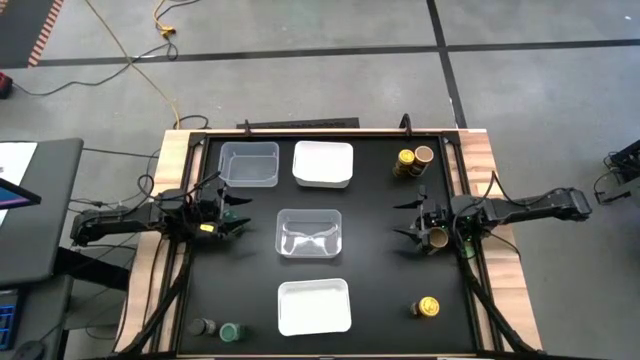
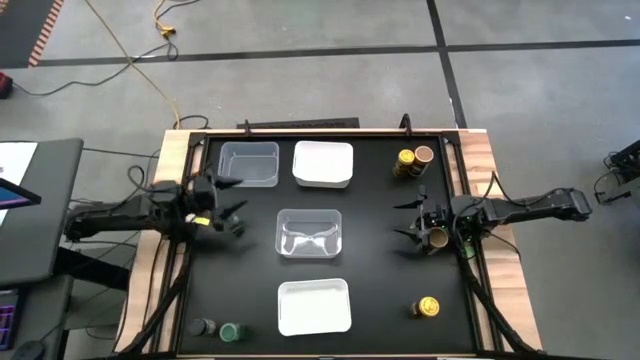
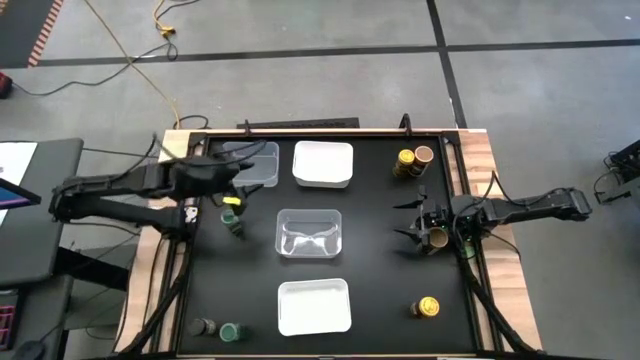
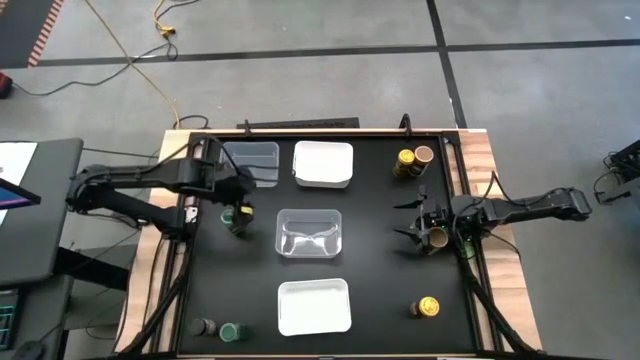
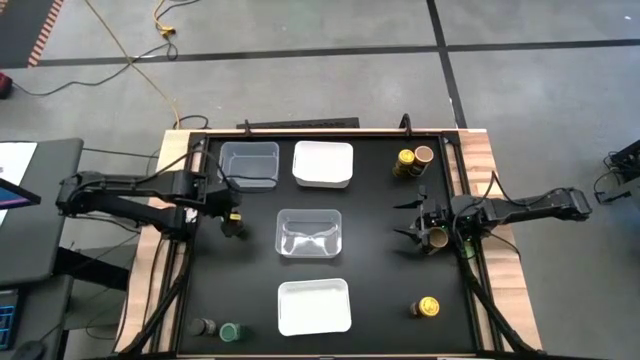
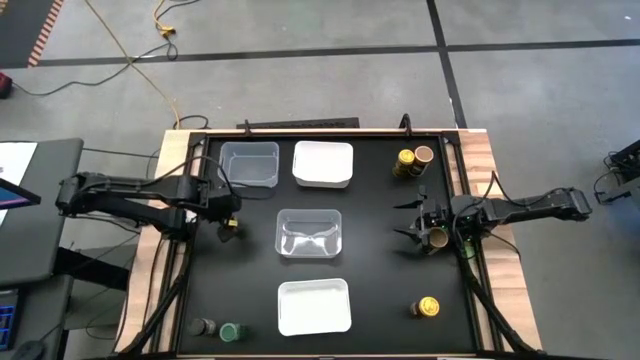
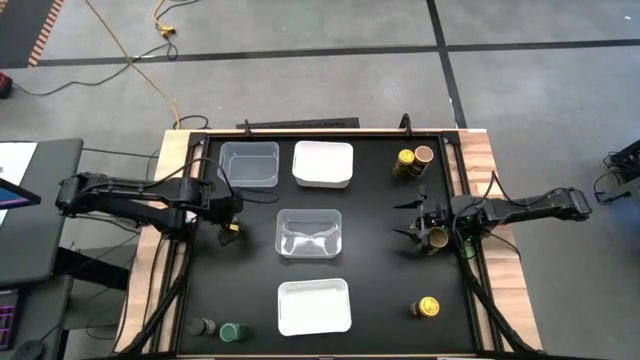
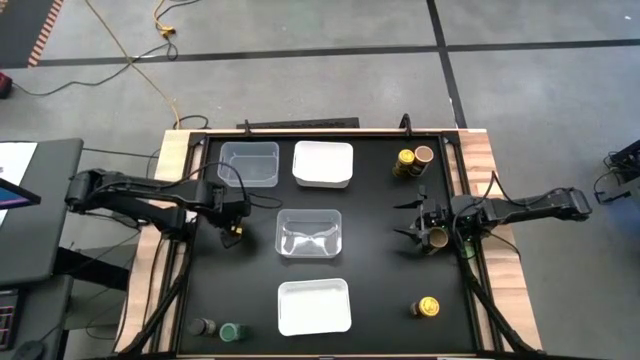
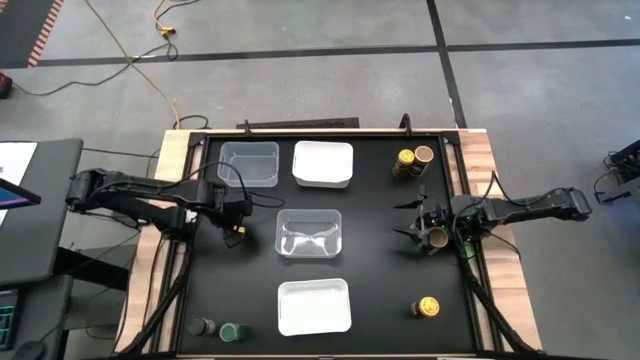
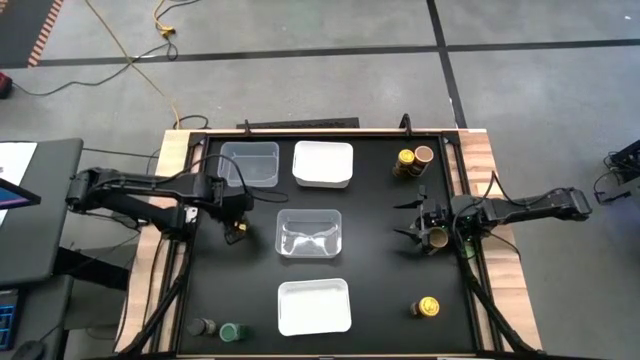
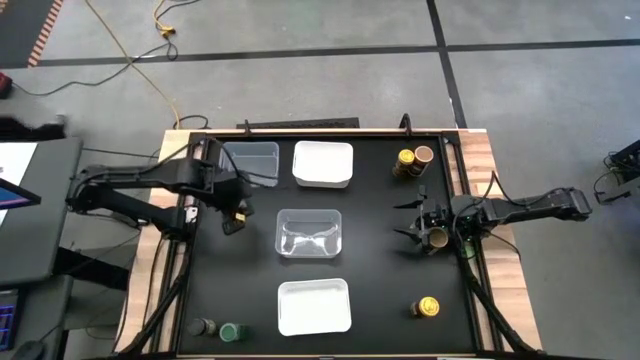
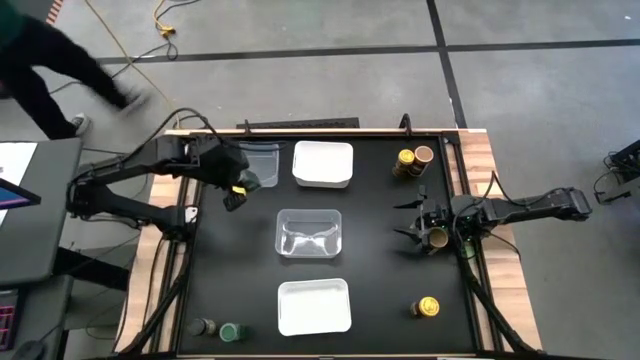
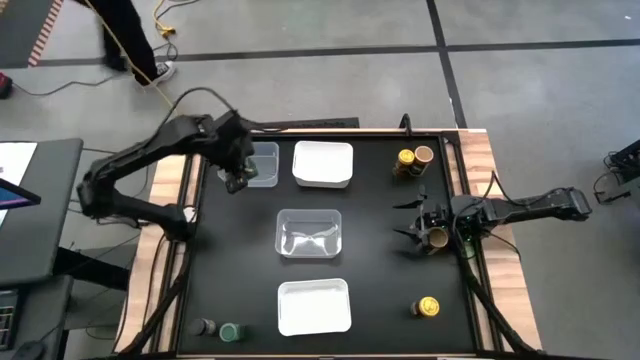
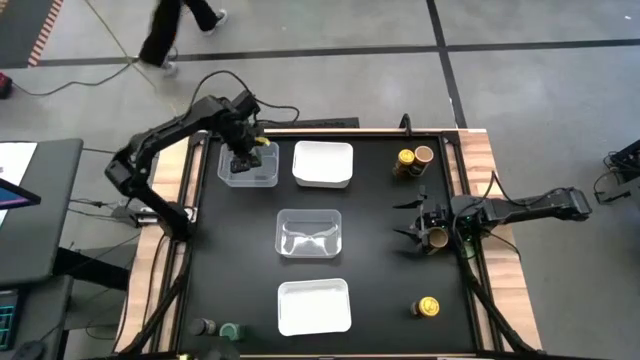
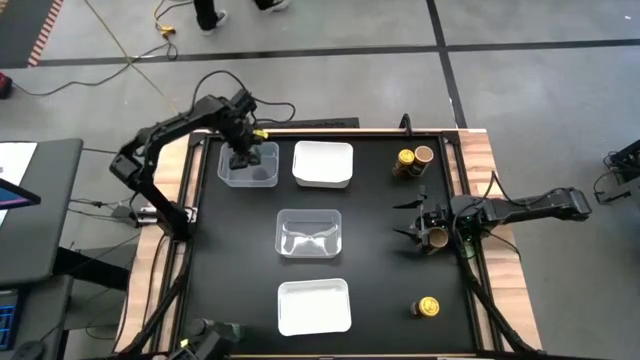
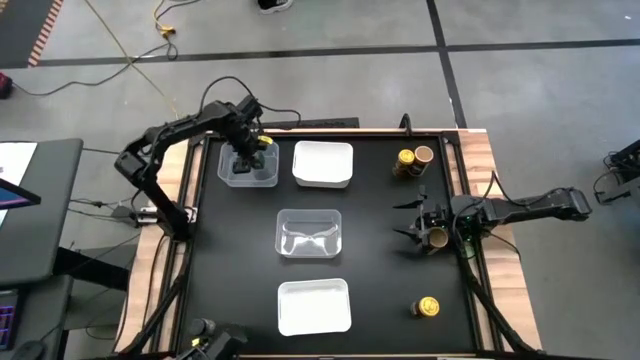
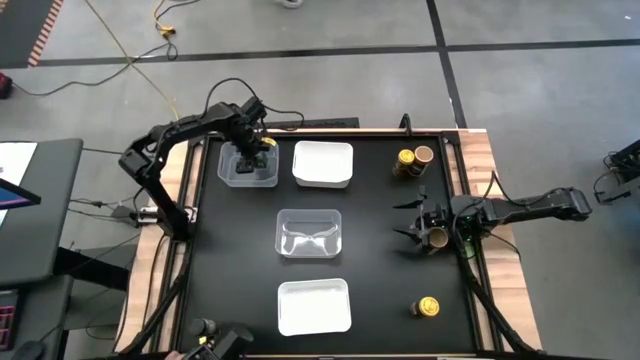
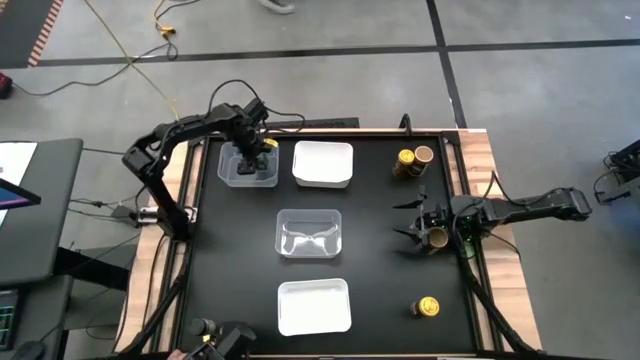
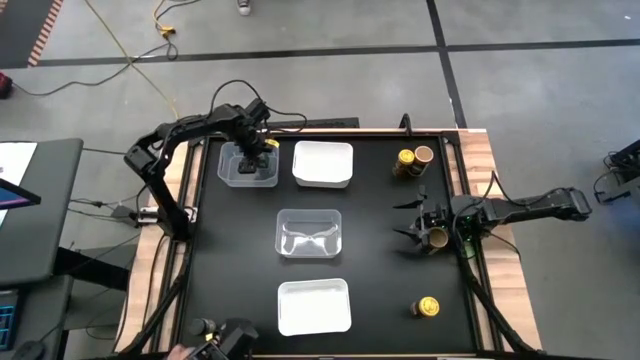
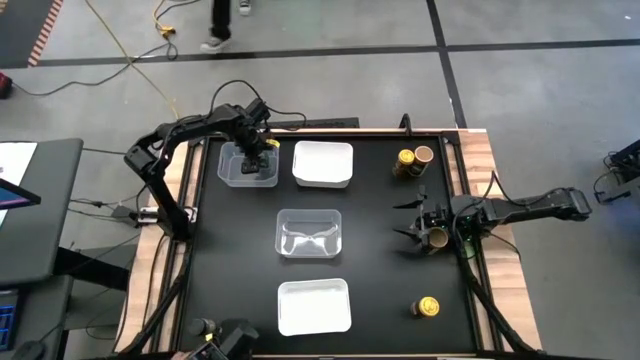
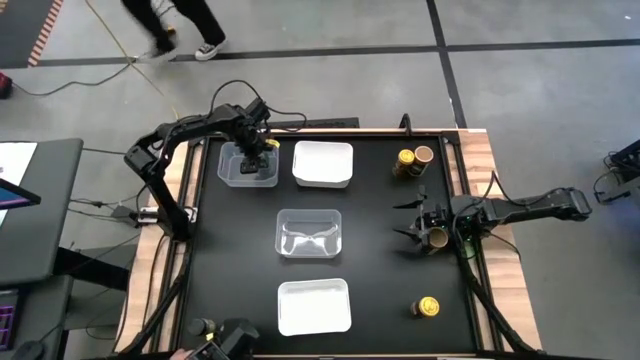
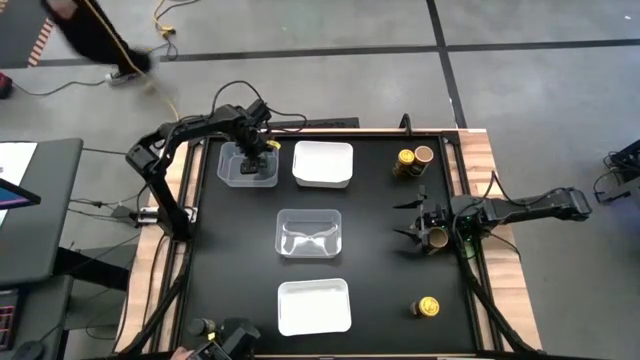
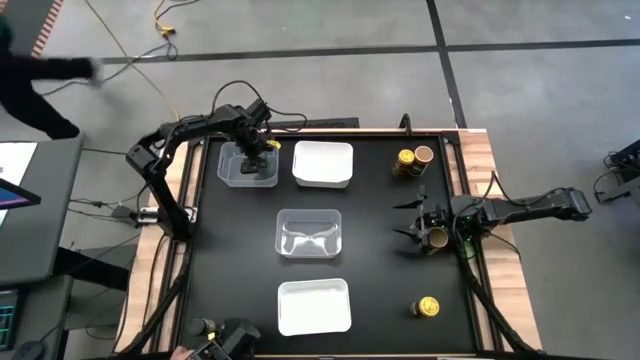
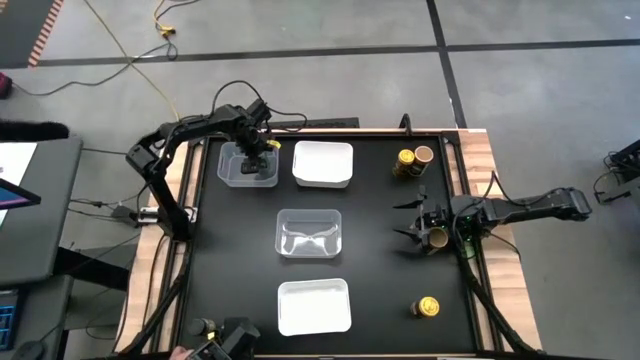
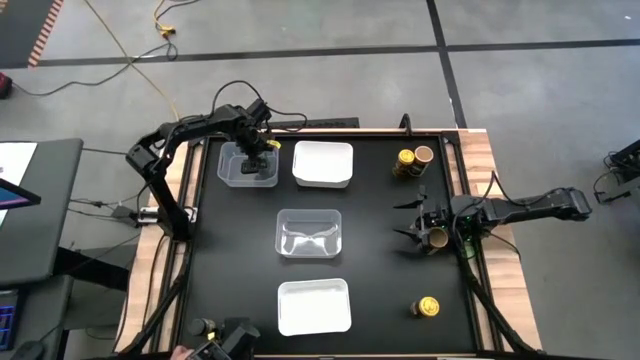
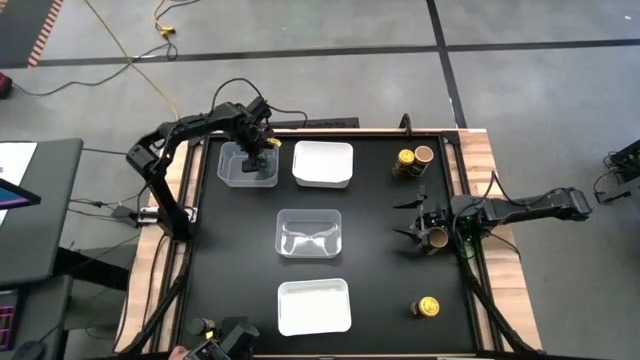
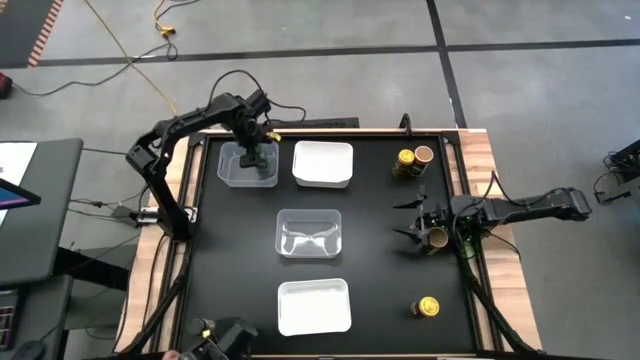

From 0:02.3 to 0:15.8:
Task: Sort spices by type
Put the top green seasoning bottle into the top transparent bin

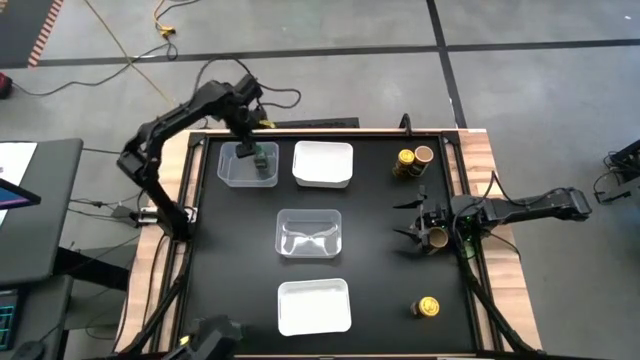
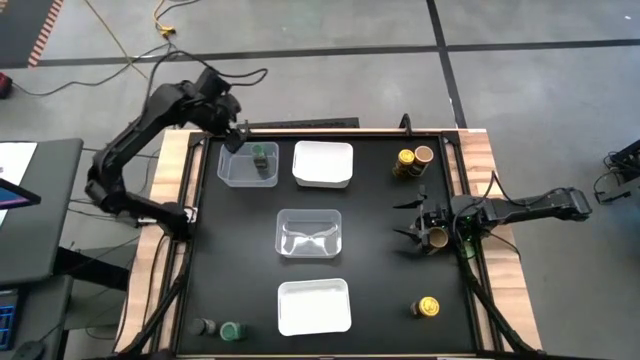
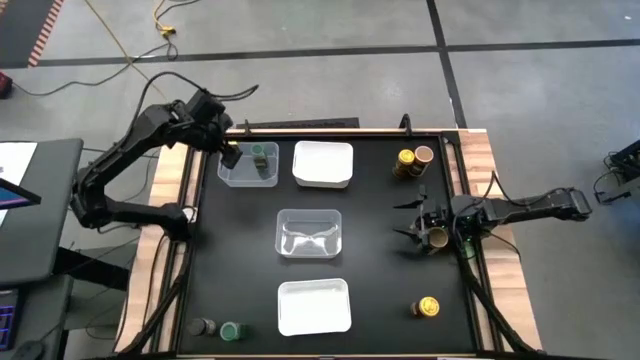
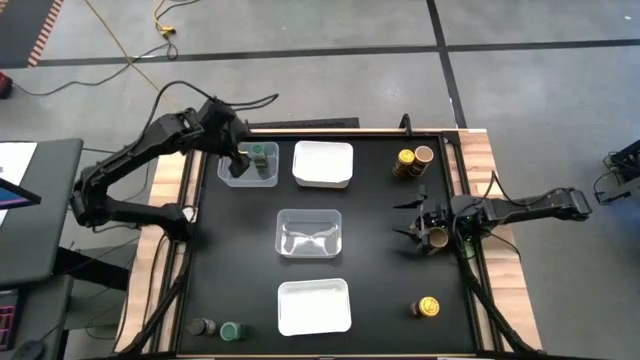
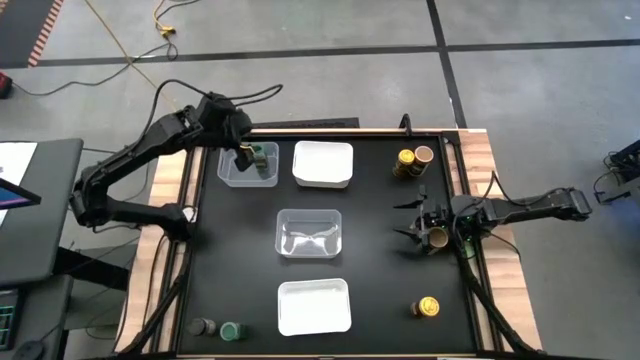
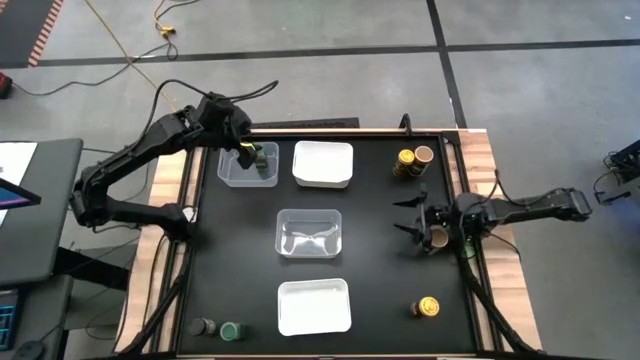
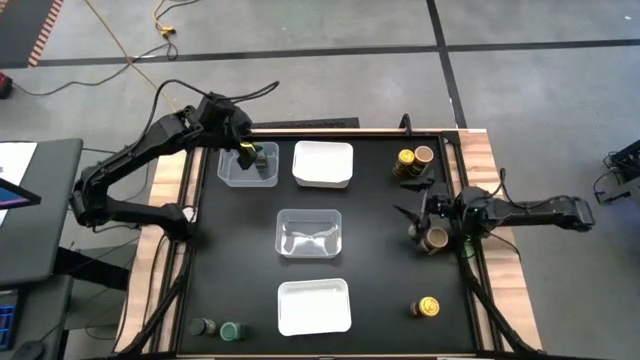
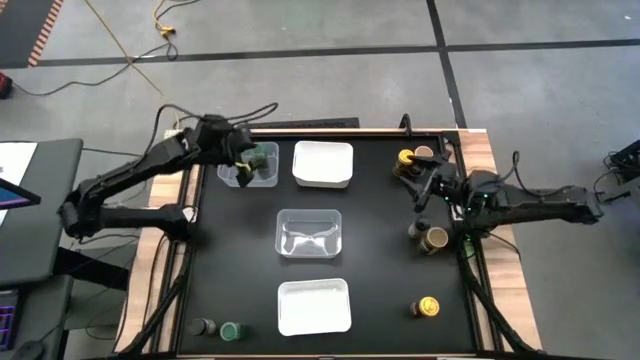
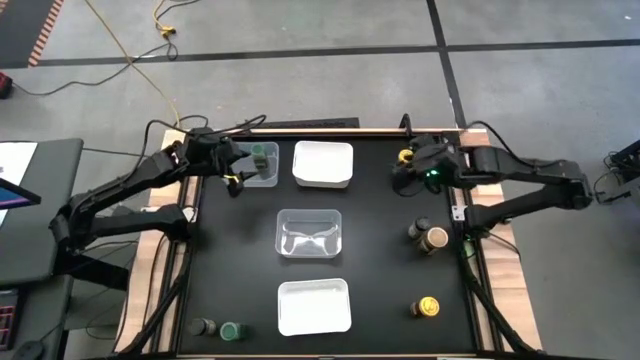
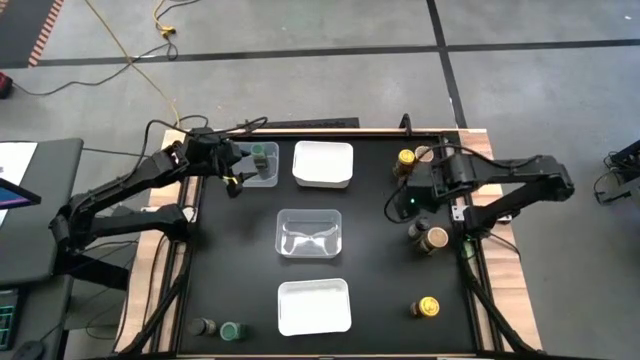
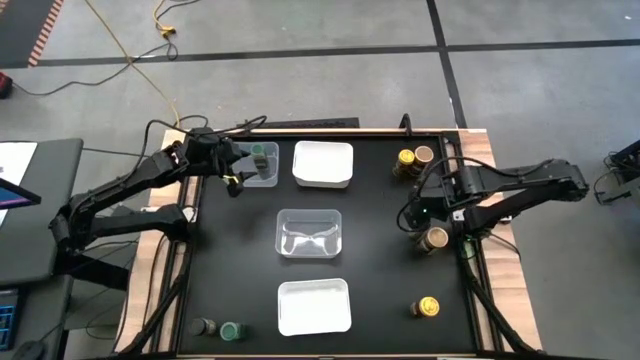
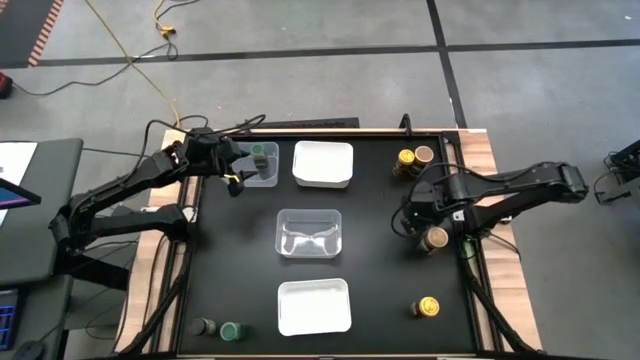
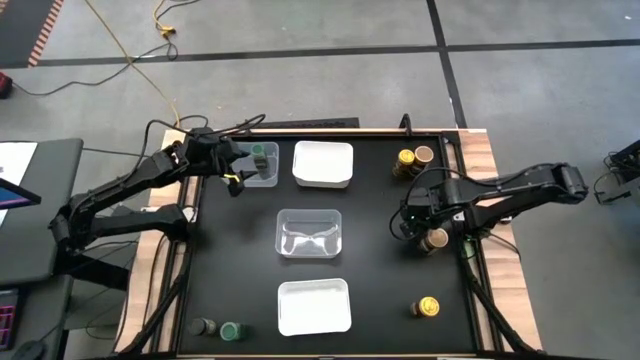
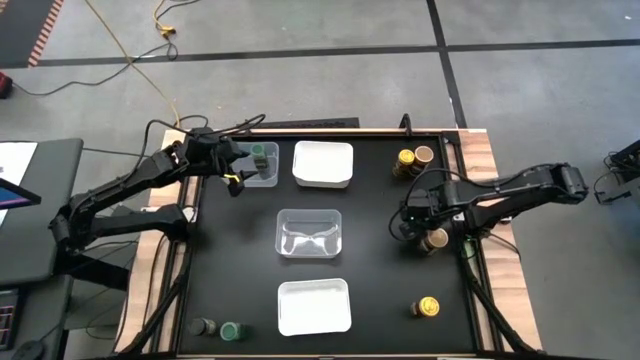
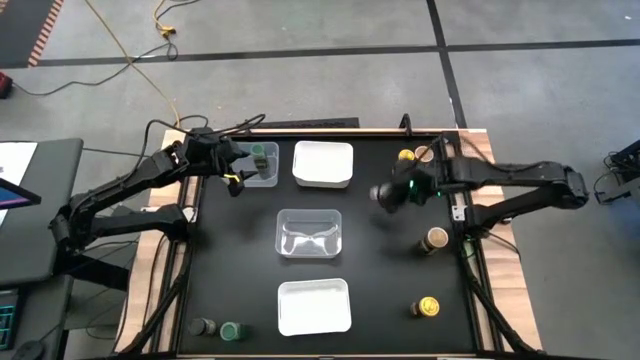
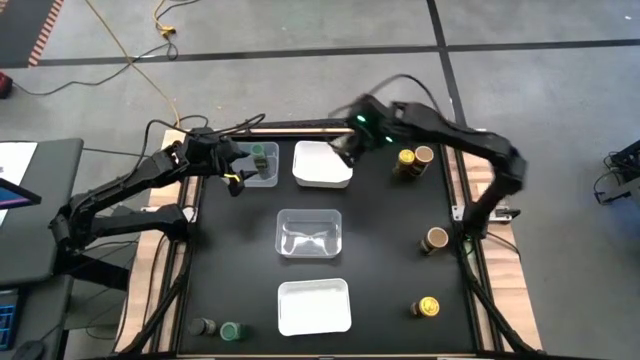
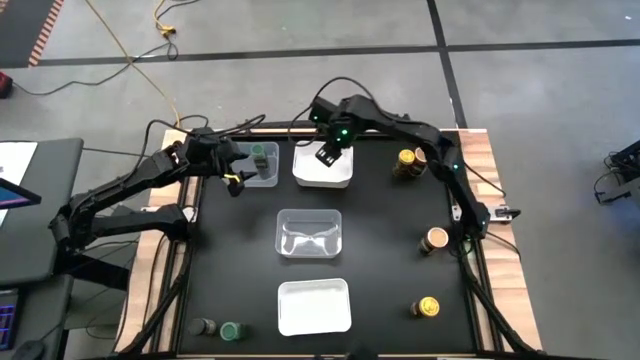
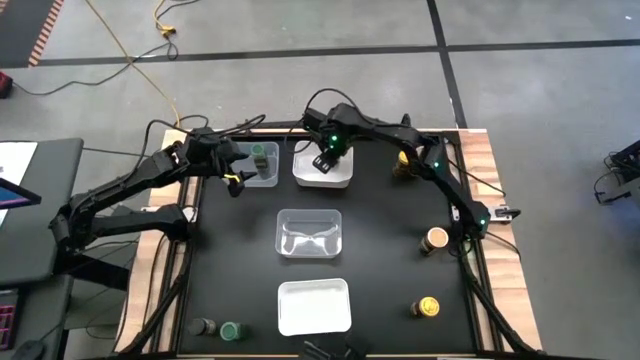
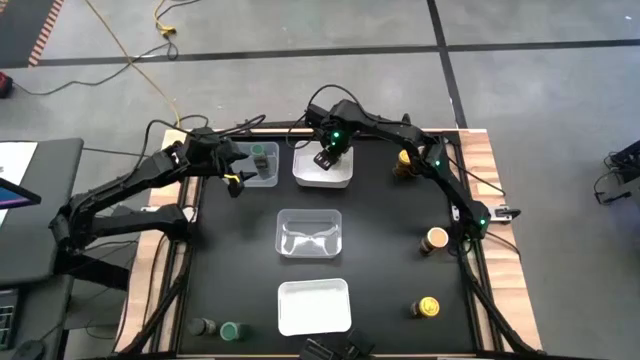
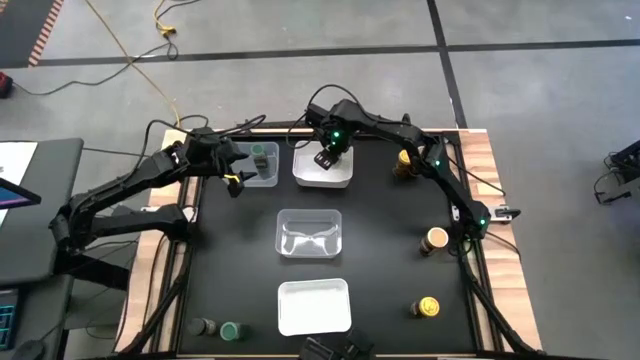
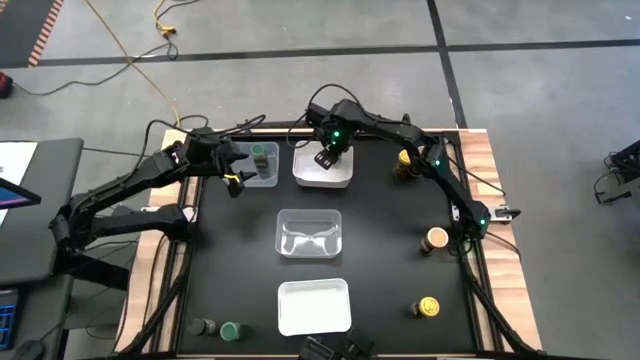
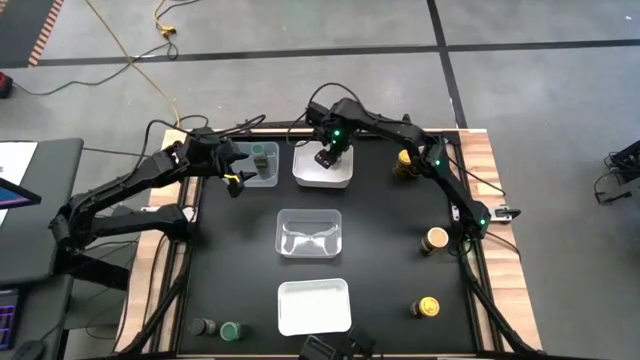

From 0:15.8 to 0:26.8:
Put the top black seasoning bottle into the top white bin
